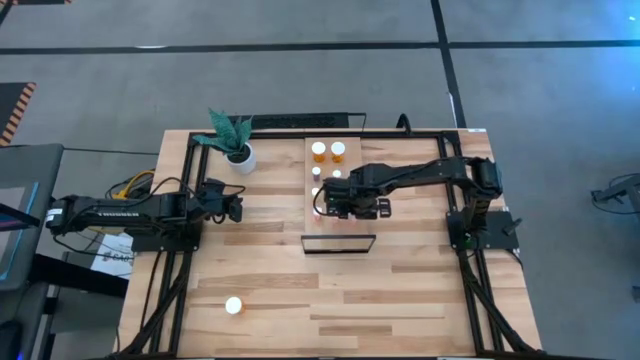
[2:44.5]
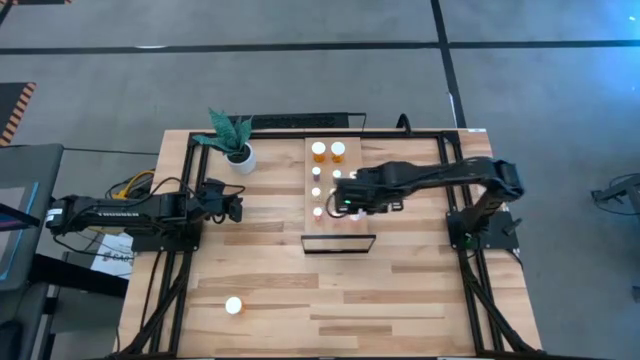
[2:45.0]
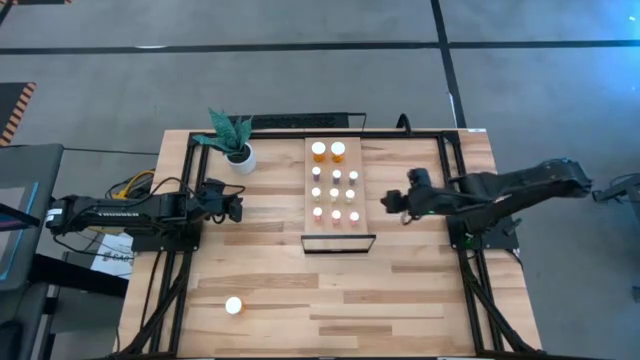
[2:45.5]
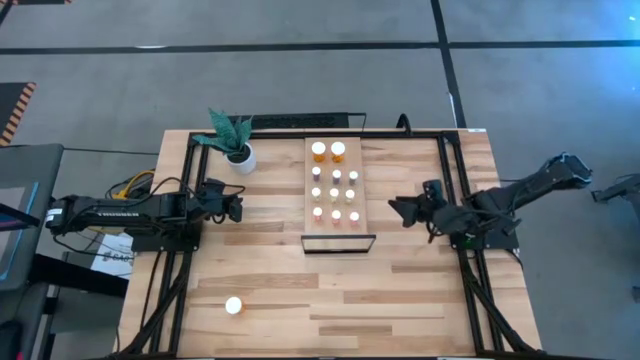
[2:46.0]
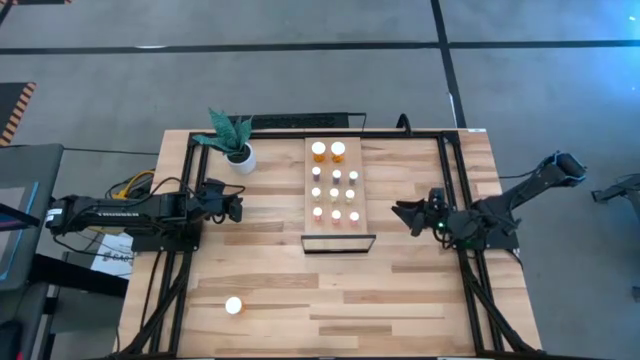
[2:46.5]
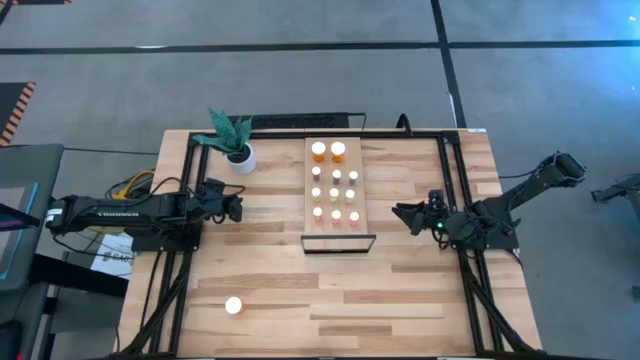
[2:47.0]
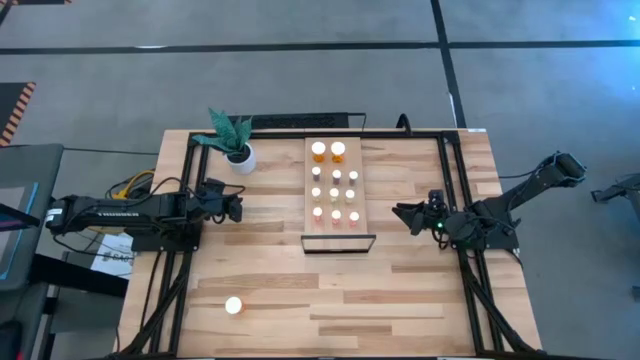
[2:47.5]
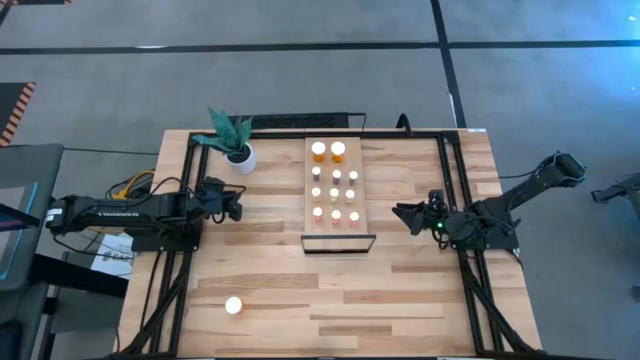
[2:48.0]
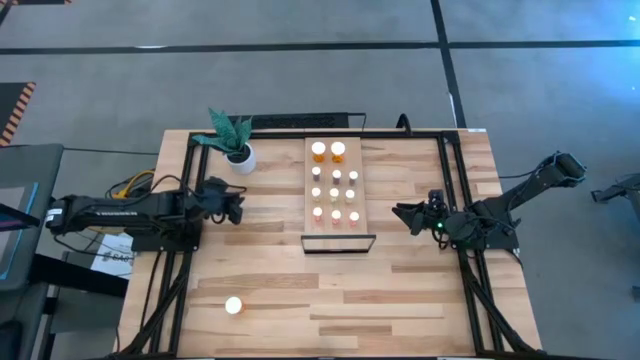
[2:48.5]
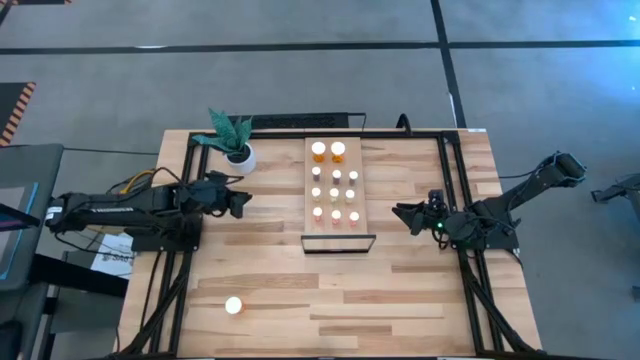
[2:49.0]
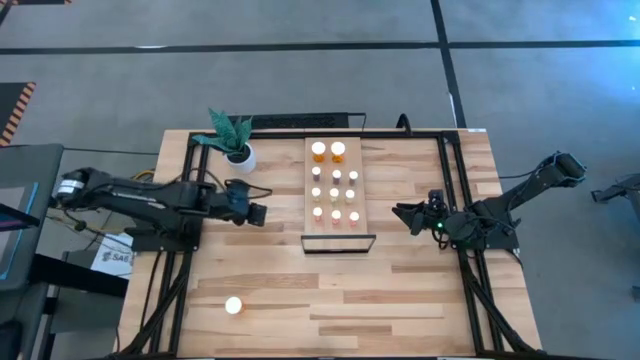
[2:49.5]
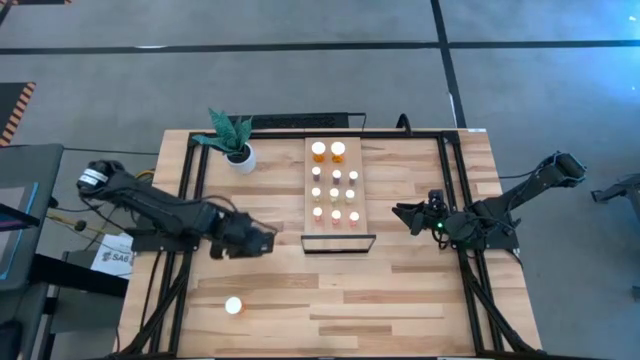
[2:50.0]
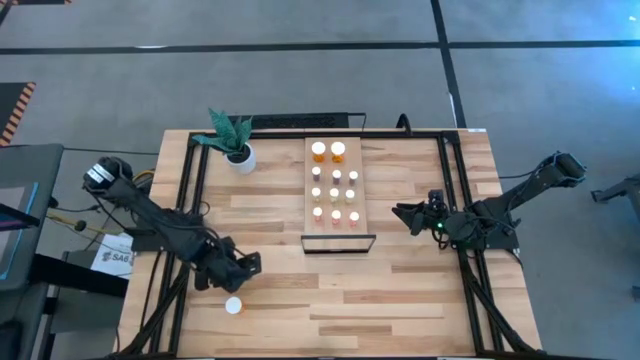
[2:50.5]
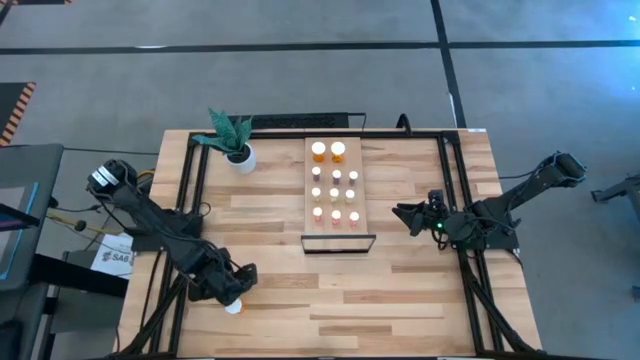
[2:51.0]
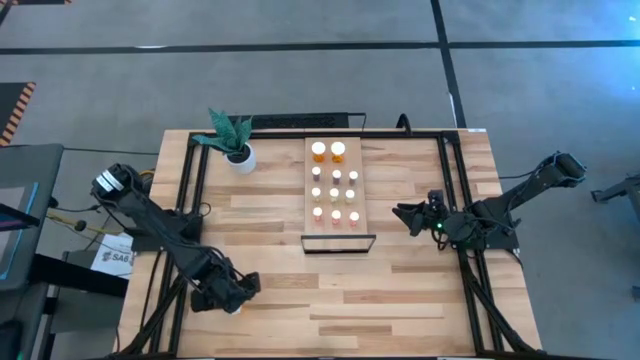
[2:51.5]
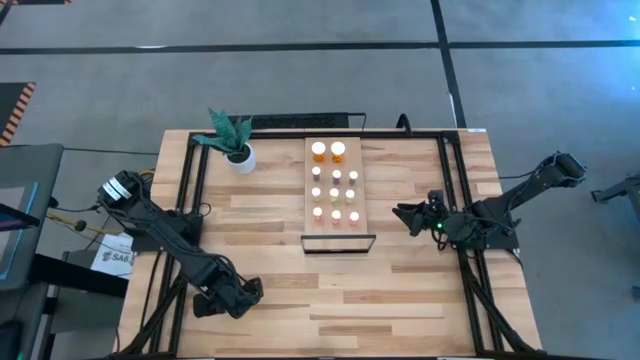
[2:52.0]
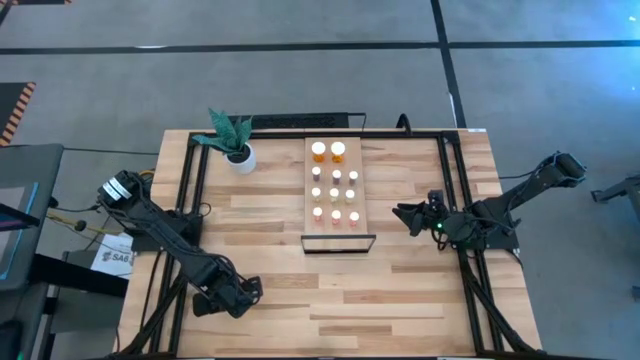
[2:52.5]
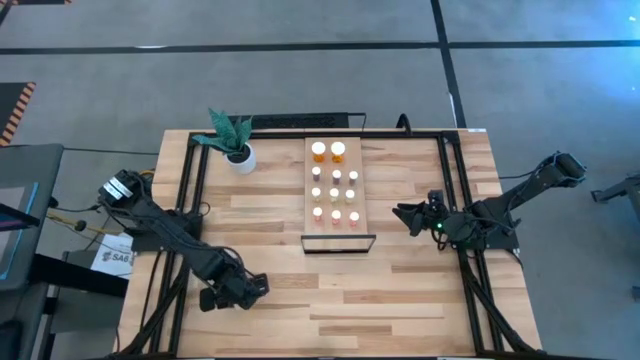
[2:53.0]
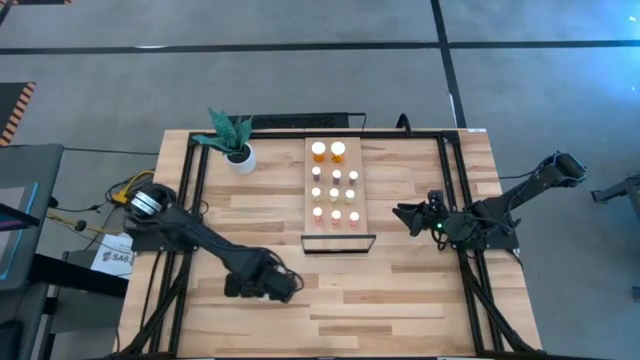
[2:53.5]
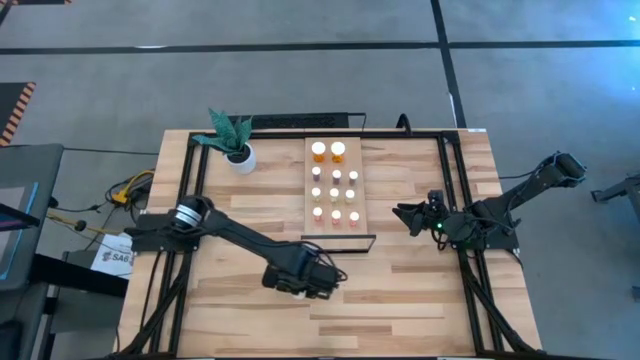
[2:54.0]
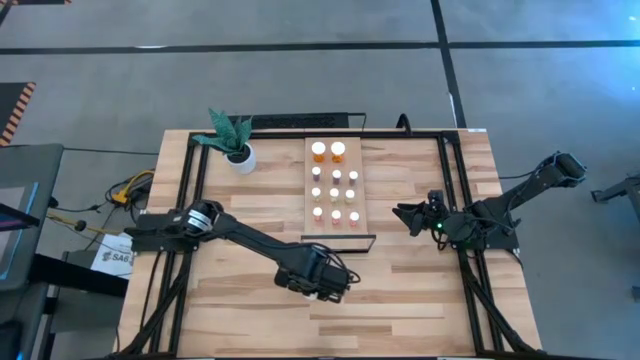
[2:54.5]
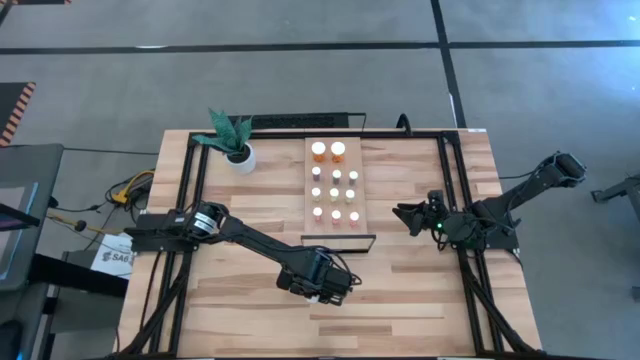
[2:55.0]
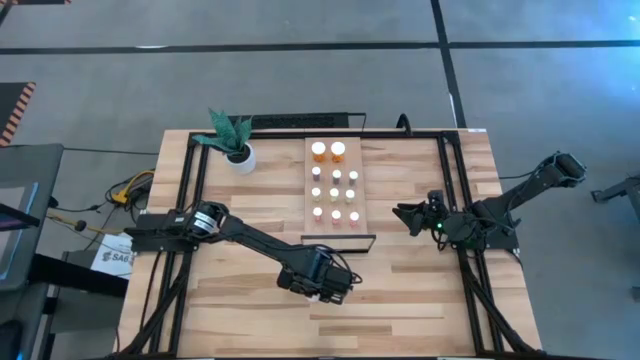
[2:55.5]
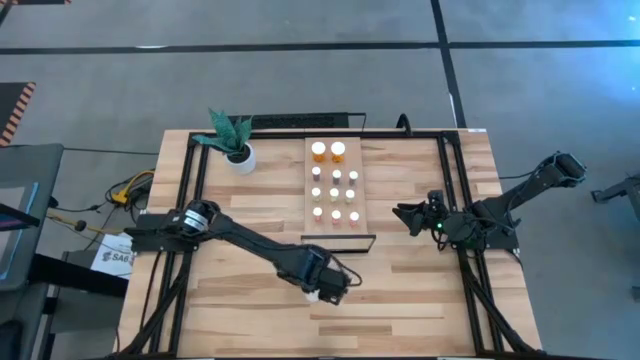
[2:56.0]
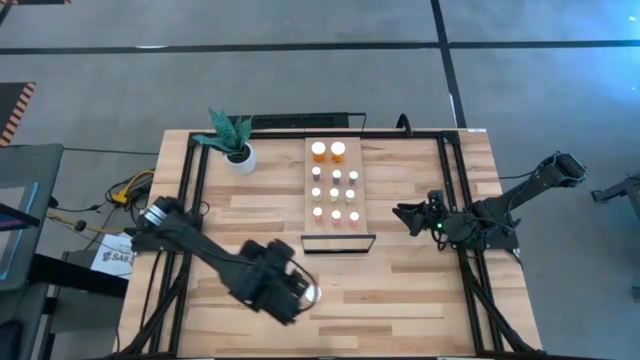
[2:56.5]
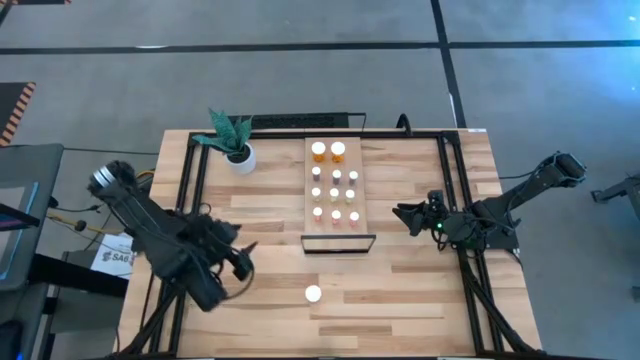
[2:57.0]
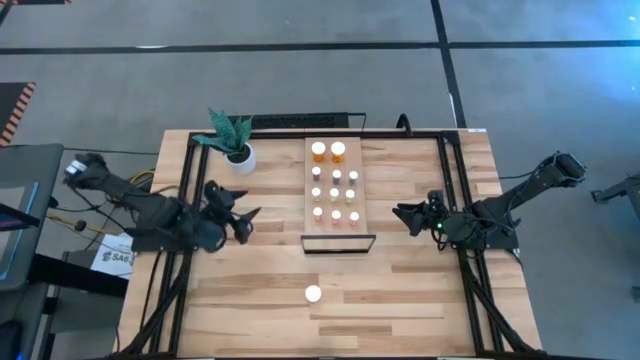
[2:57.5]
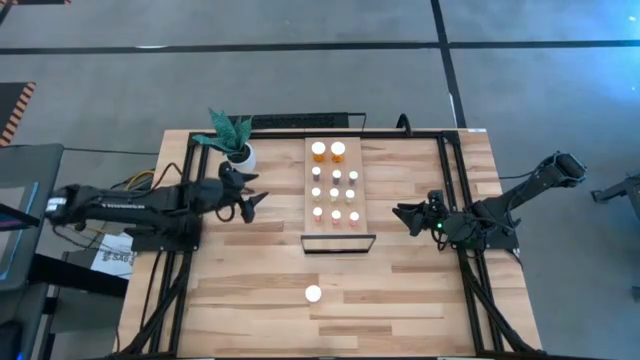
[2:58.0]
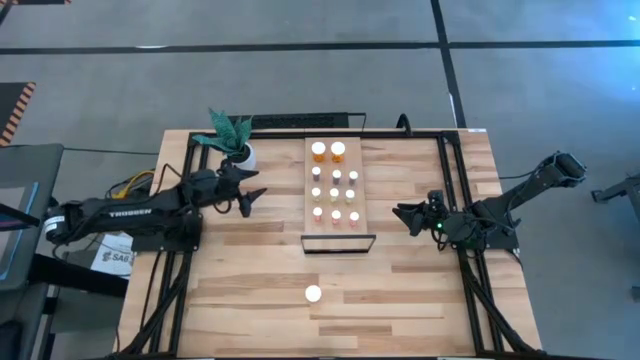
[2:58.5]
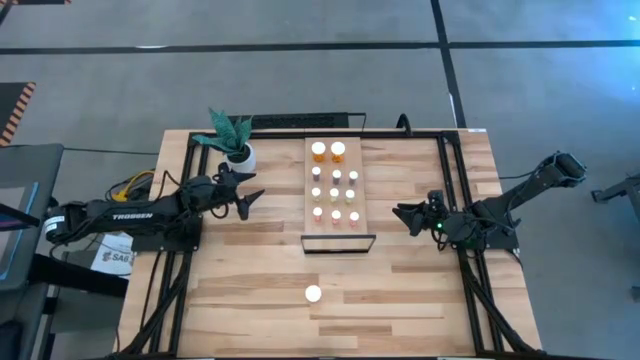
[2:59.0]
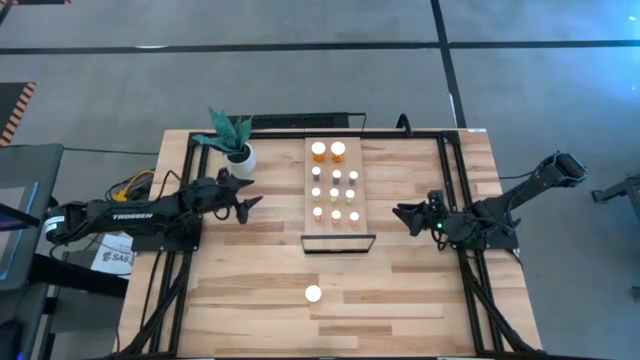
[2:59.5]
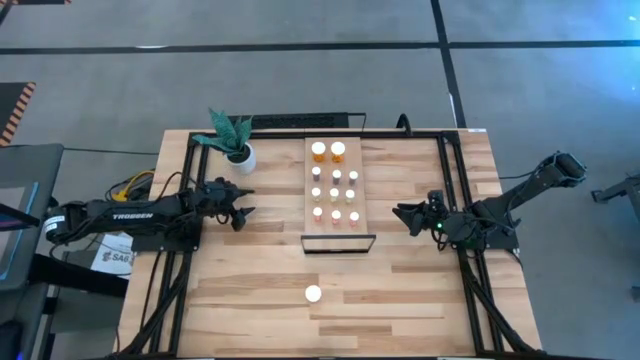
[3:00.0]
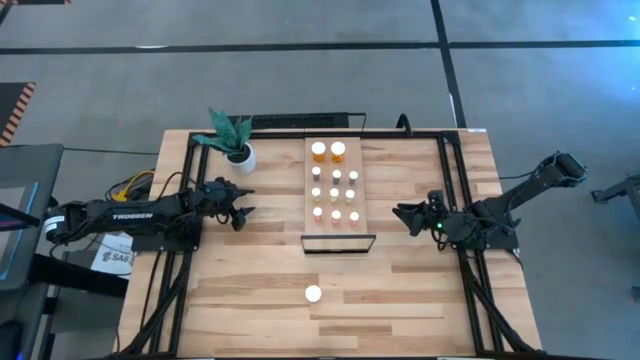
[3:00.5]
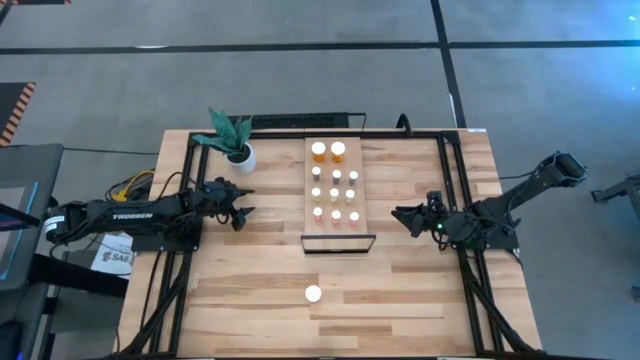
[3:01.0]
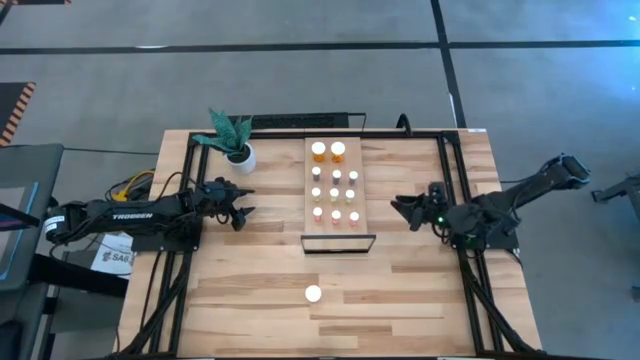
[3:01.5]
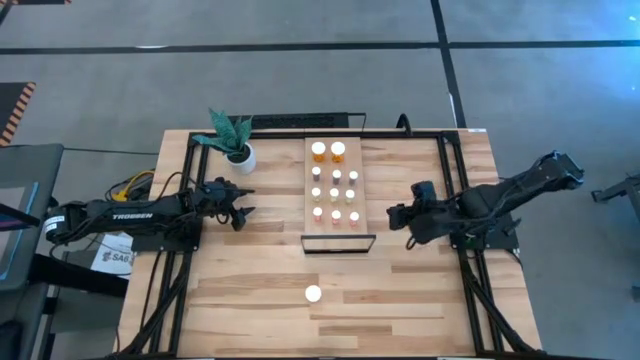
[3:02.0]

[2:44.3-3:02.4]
Task: Pick and place medicine bottles onto shelf by color
Put the orange pill bottle on the shelf aligned with the other orange pill bottles

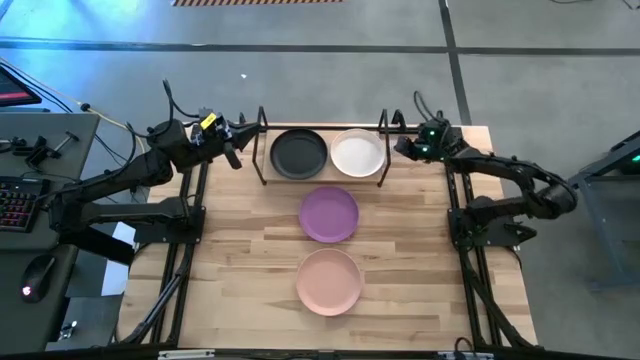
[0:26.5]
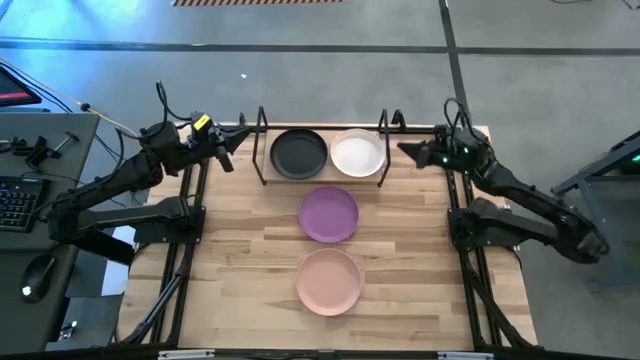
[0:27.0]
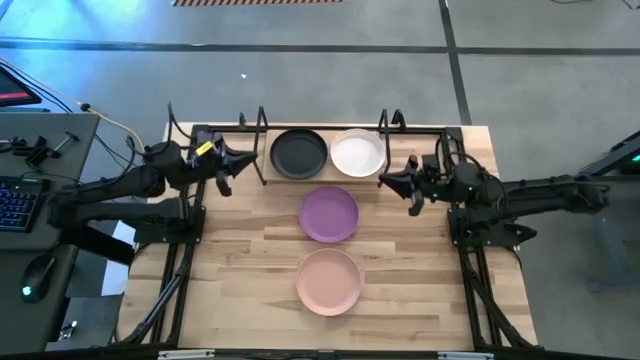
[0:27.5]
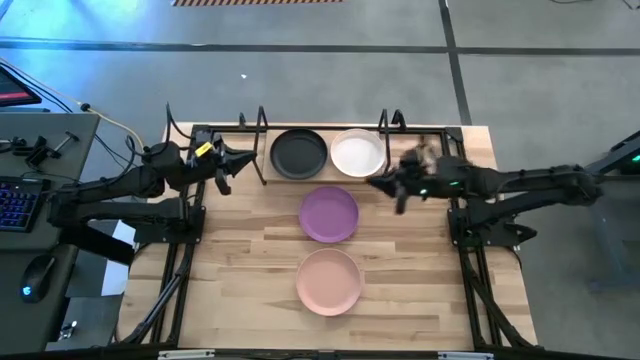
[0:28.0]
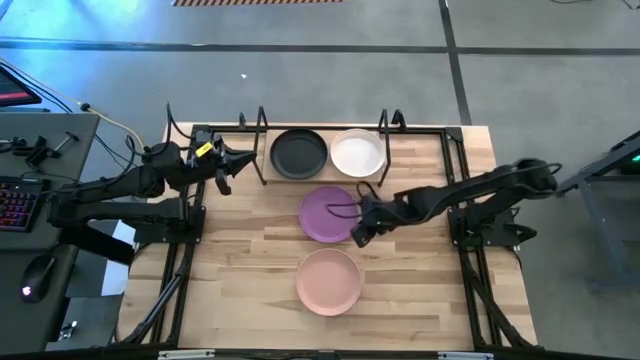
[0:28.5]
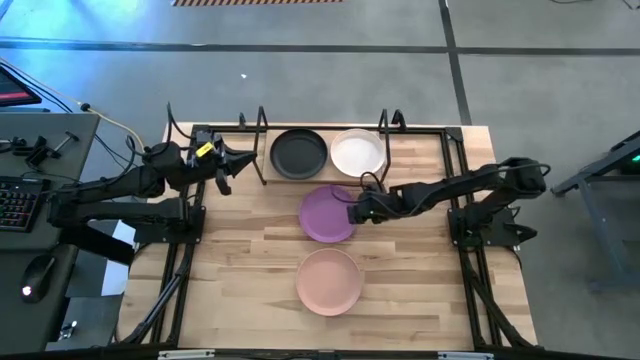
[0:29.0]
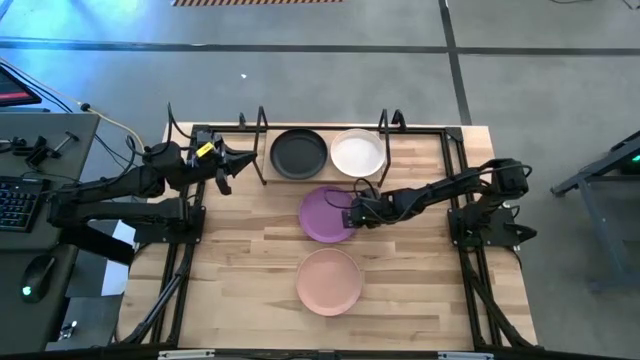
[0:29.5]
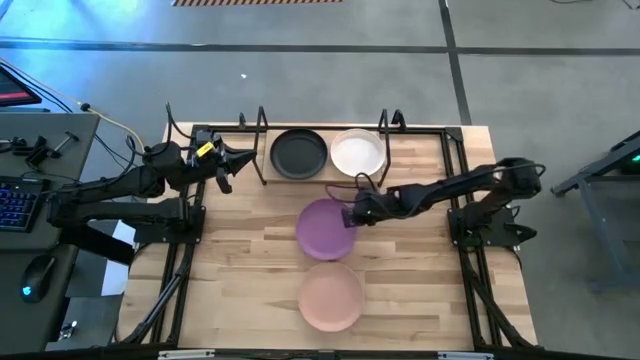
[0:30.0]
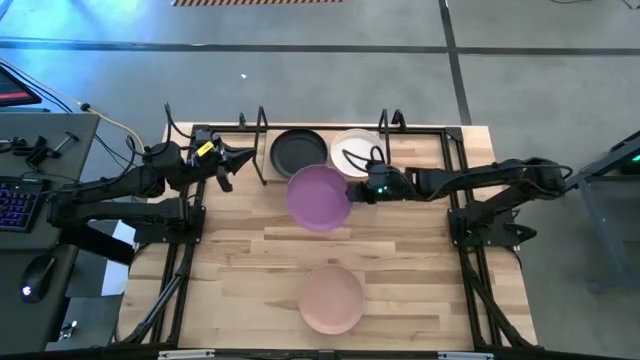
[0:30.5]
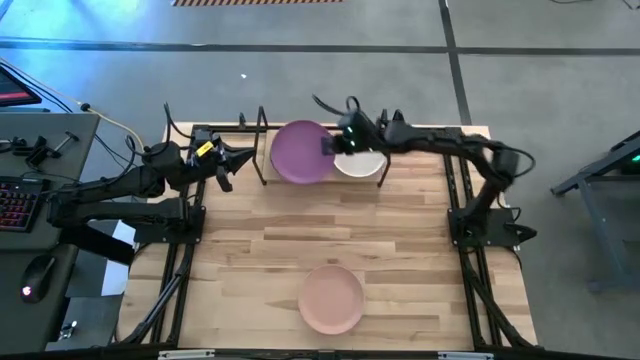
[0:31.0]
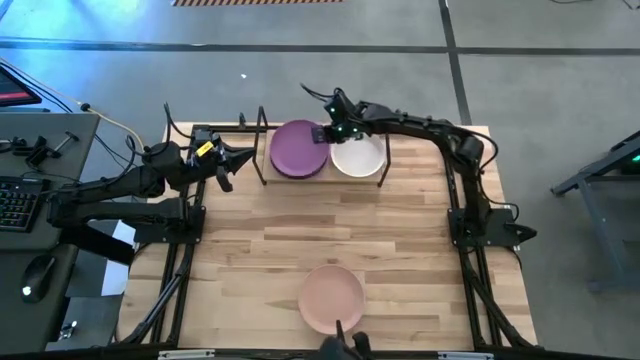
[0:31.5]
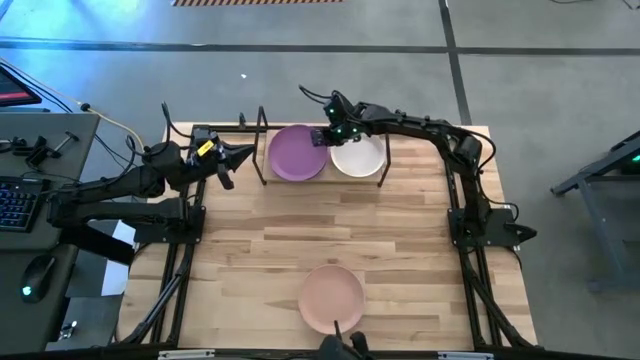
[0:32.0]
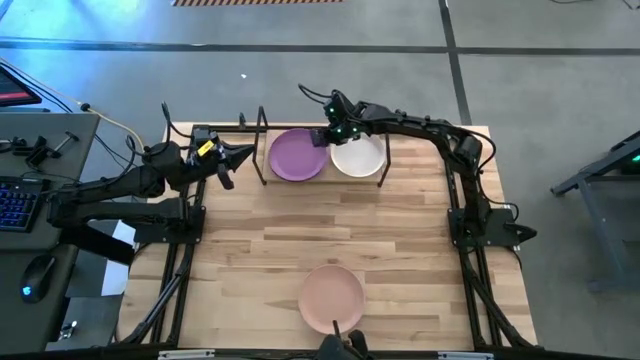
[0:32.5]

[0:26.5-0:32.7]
Task: Place and stack plates onto a shelf
Stack the purple plate on the black plate on the shelf
